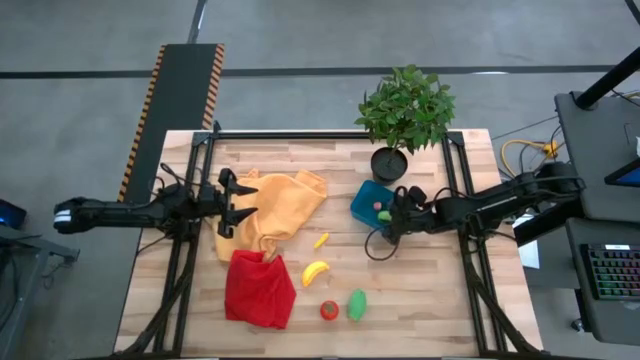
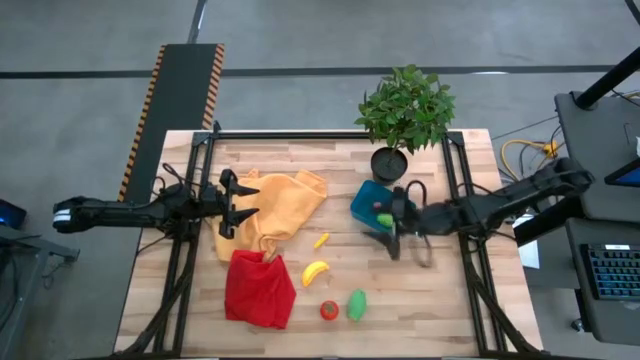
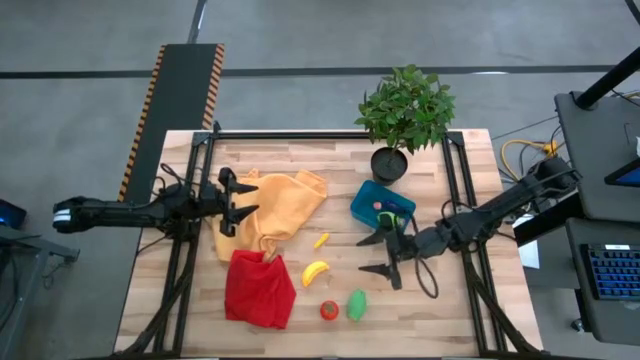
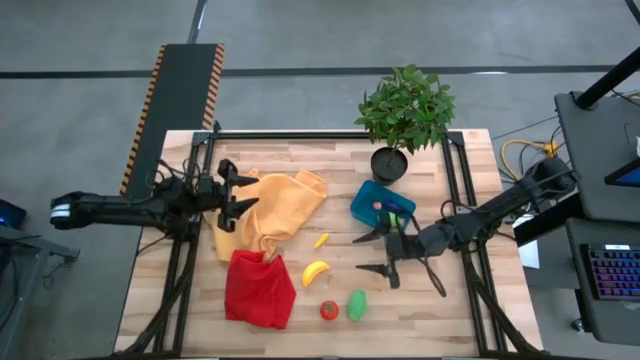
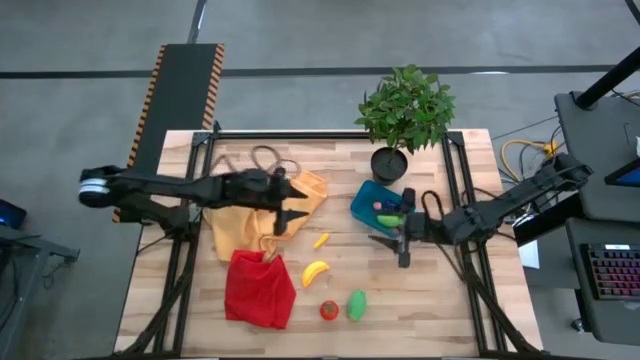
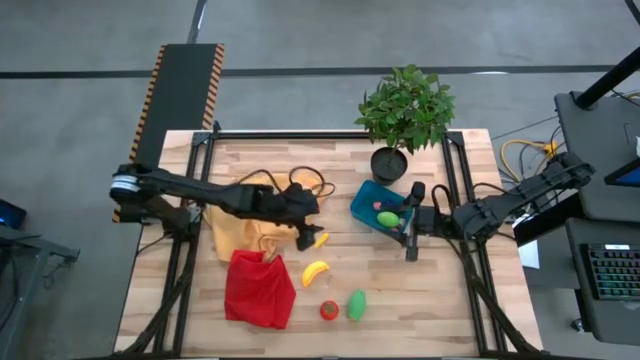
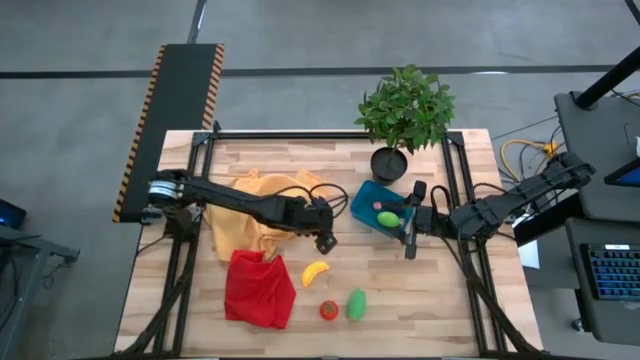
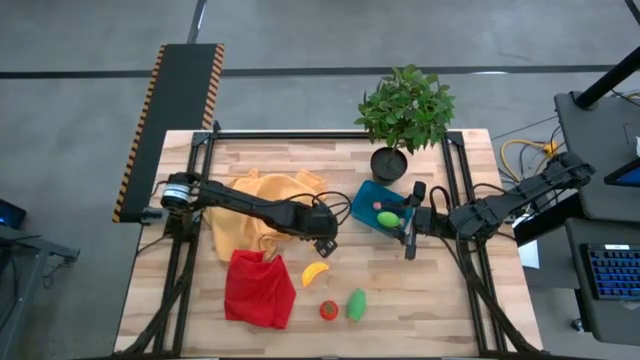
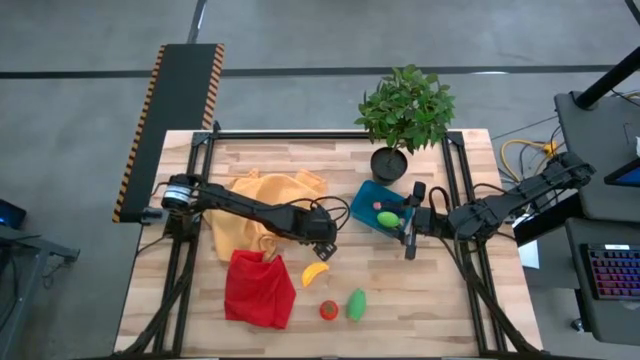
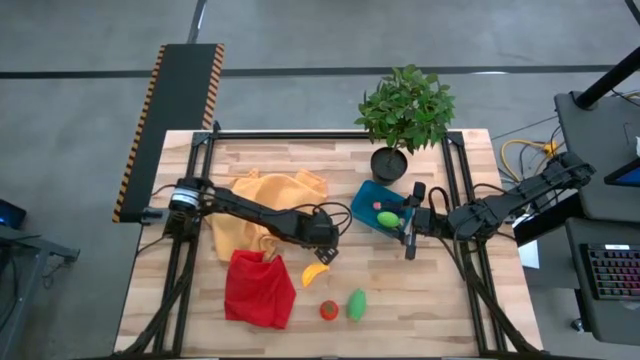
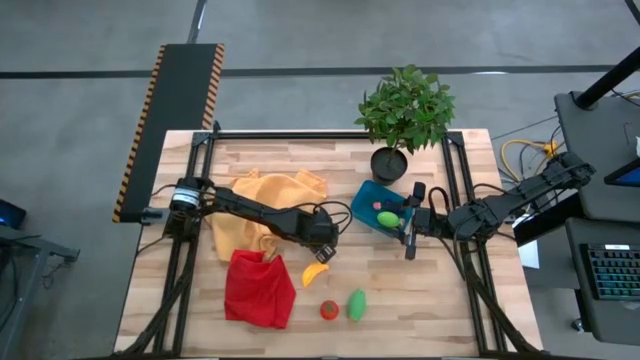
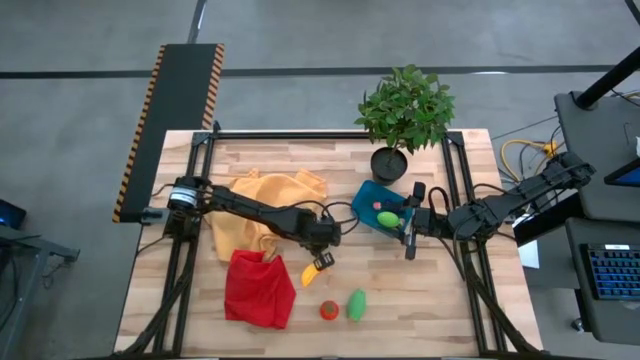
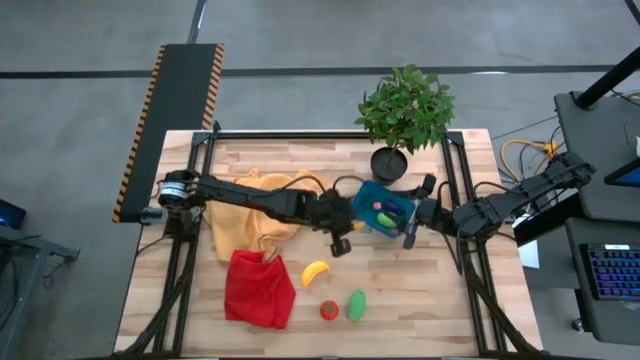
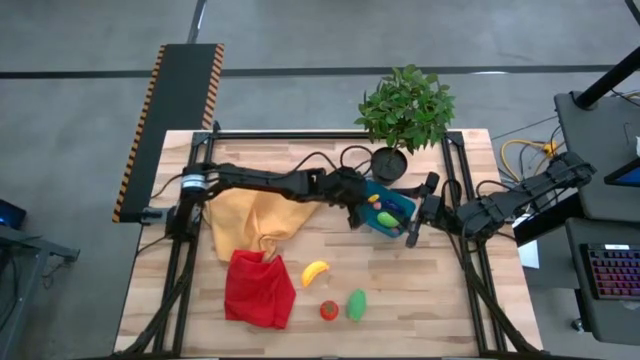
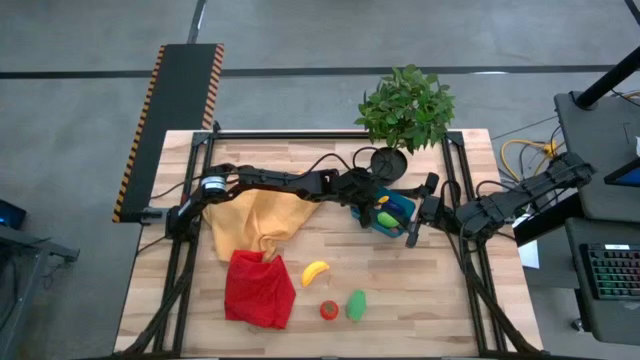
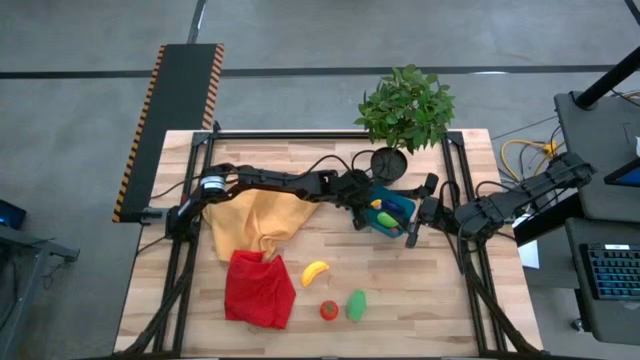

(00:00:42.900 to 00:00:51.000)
Task: Pick and placing Produce into tupperware
Put the small corn into the blue bin

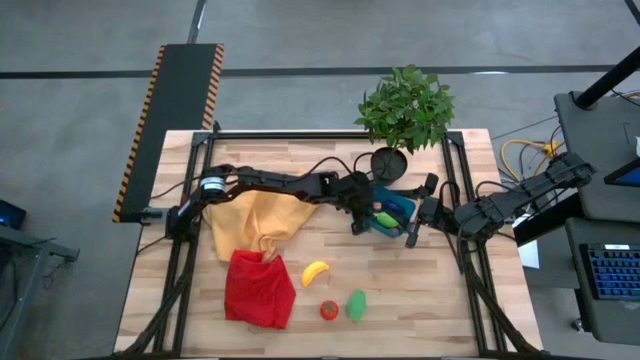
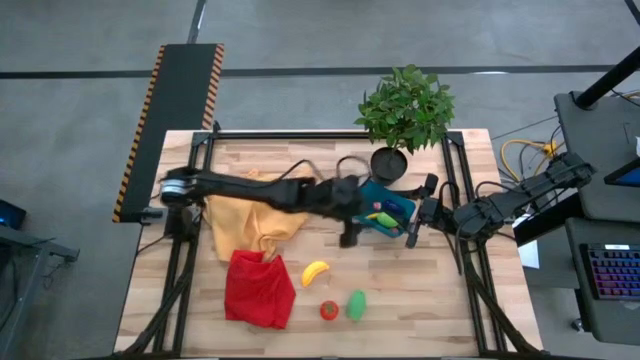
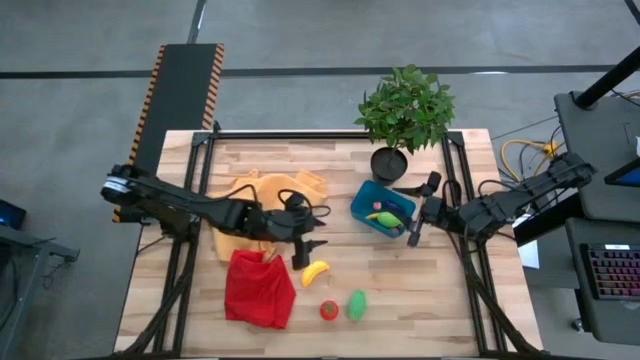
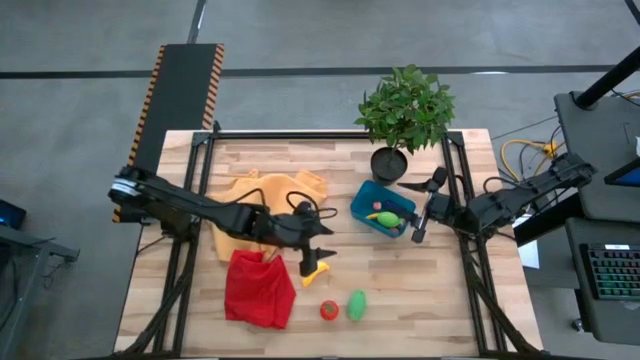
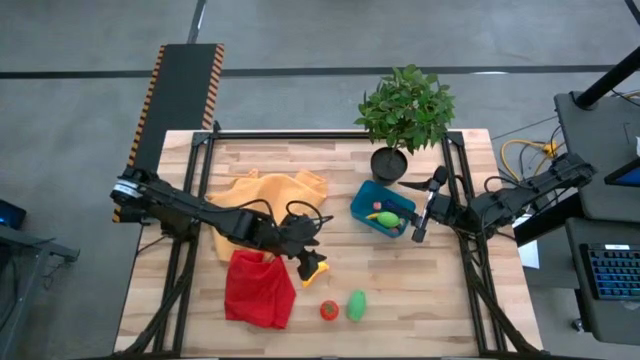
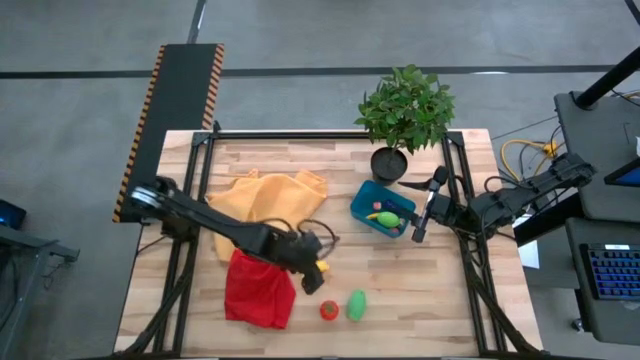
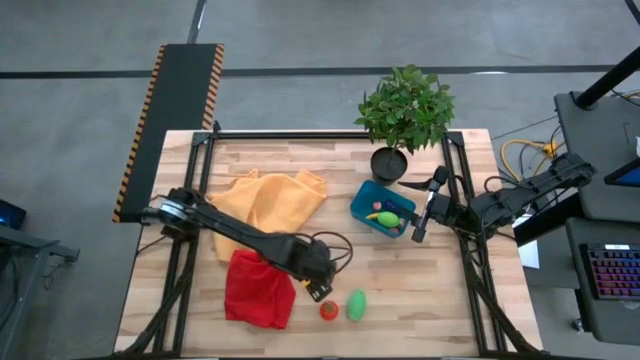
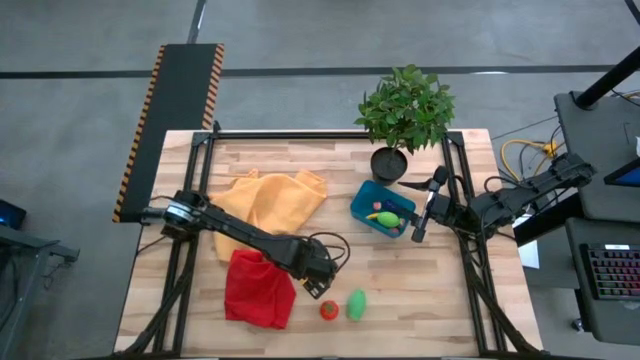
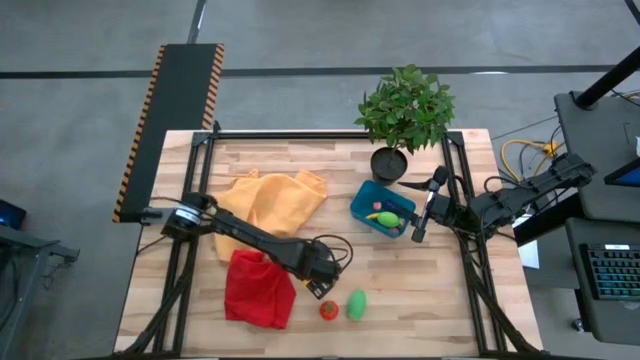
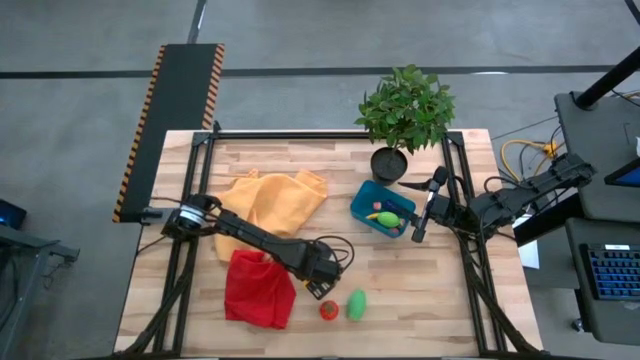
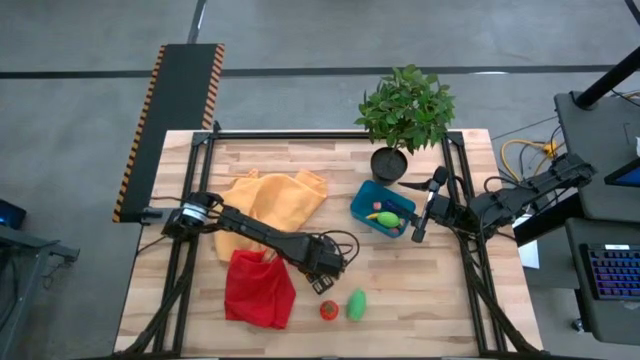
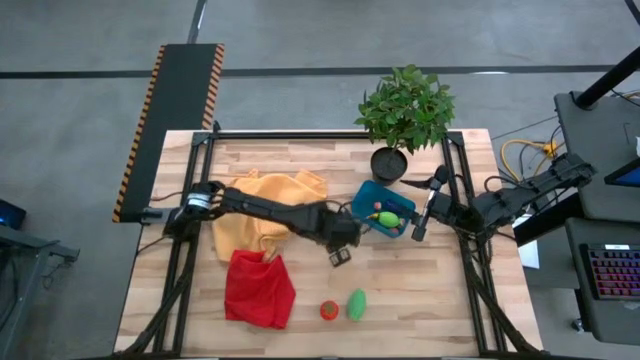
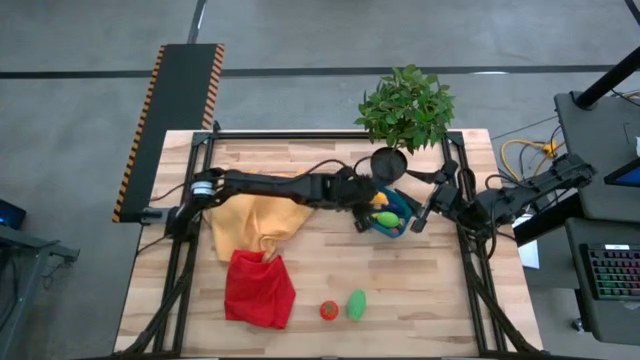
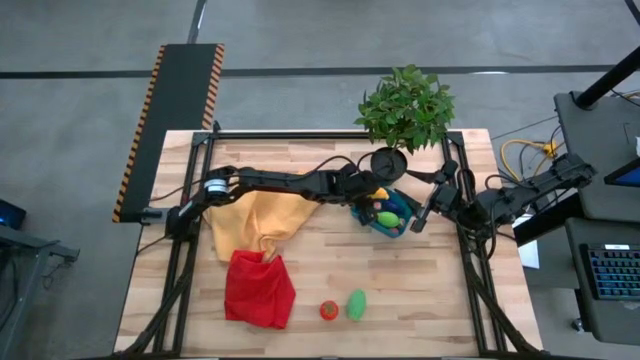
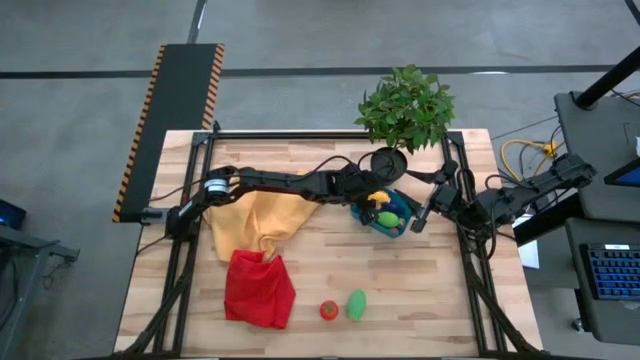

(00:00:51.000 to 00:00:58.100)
Put the banana into the blue bin

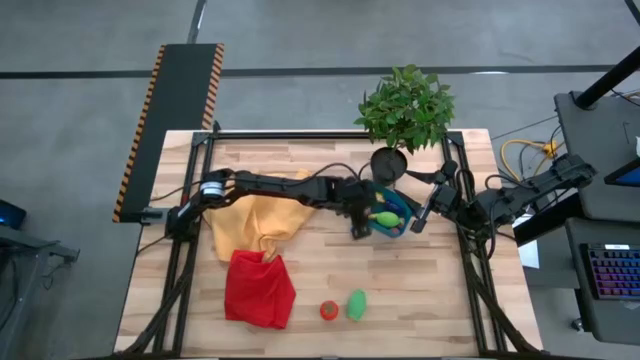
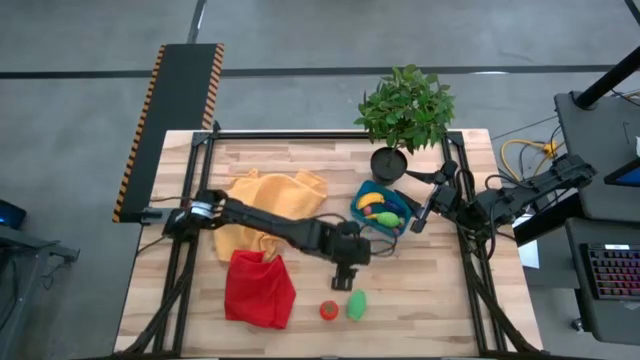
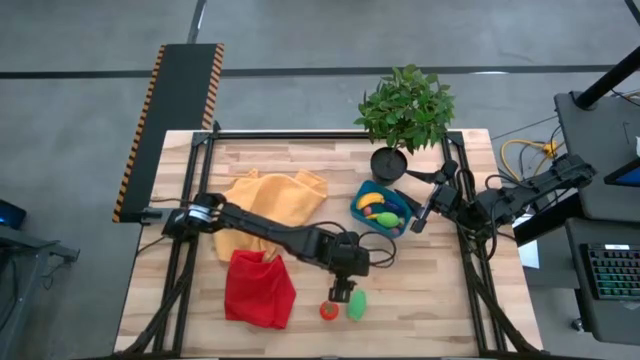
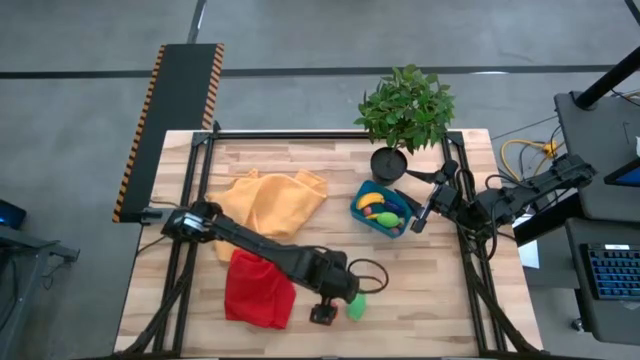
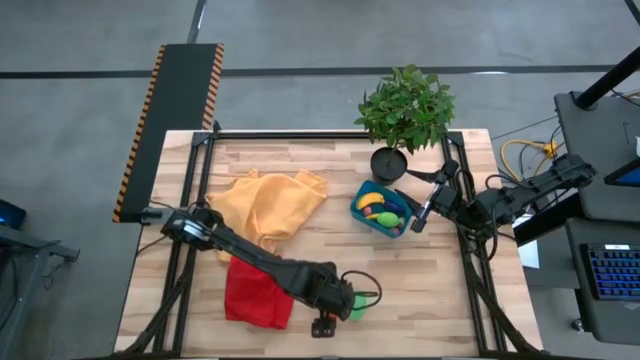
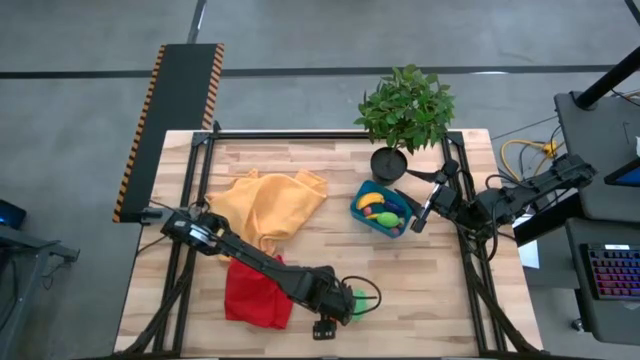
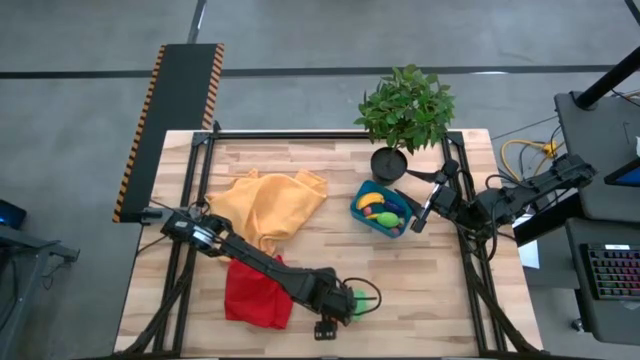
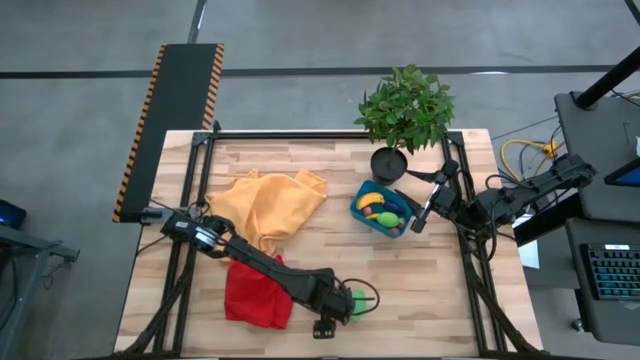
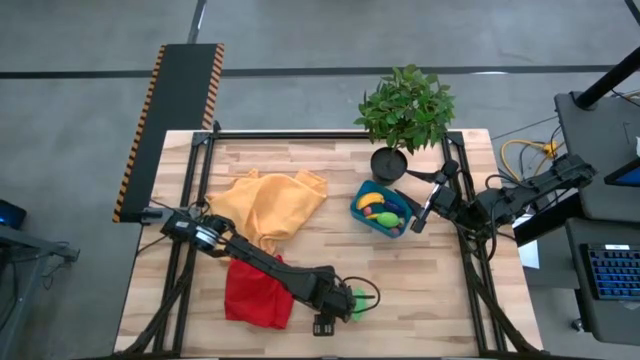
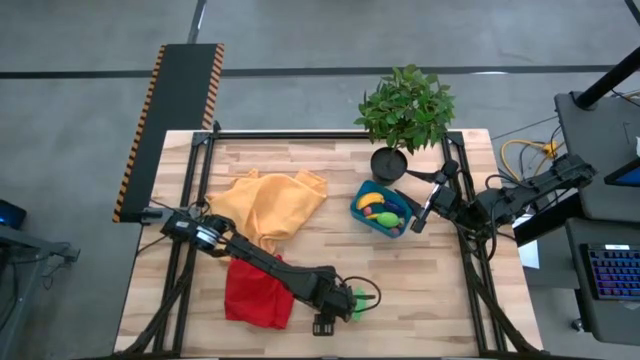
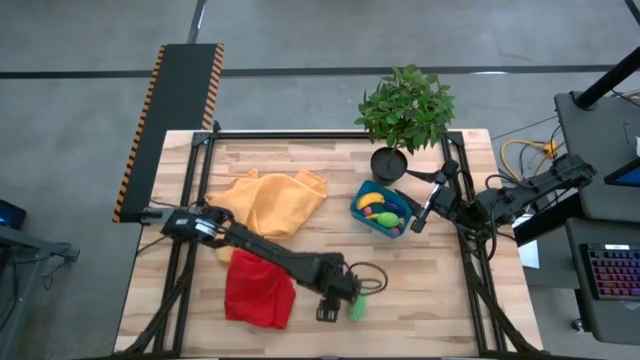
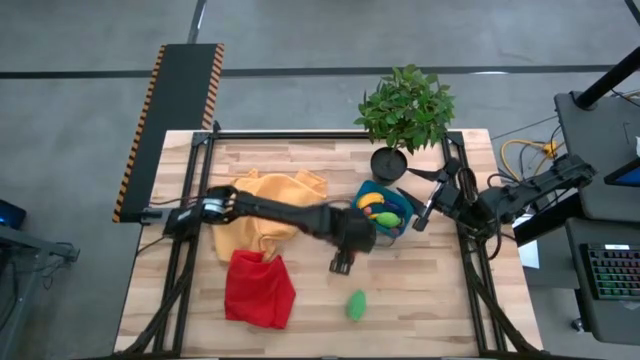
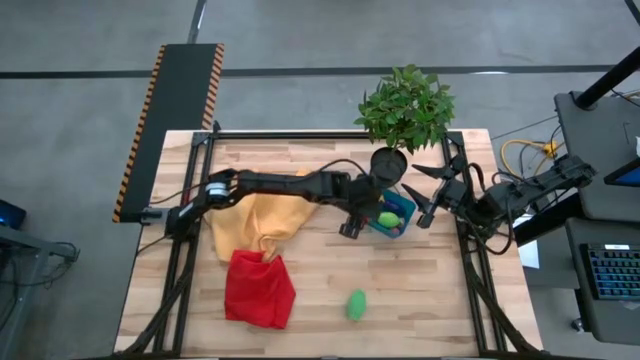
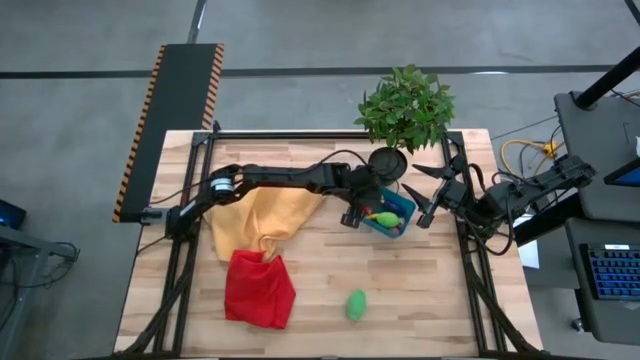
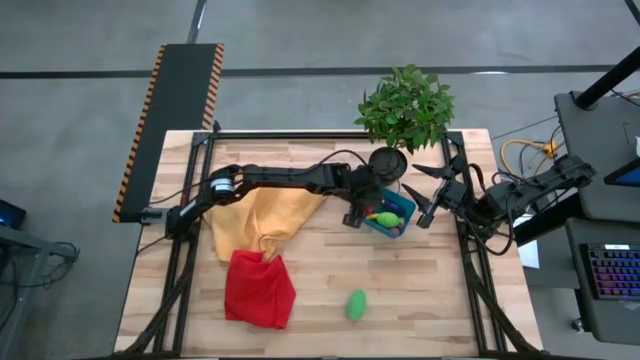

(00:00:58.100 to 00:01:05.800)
Put the tomato into the blue bin
